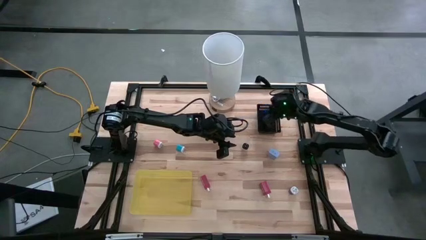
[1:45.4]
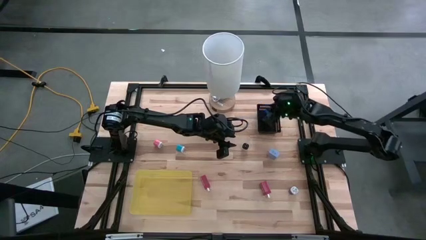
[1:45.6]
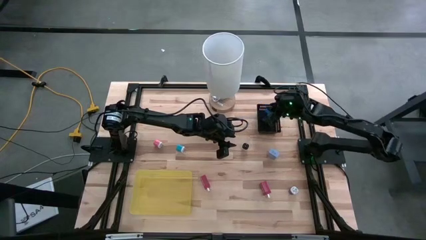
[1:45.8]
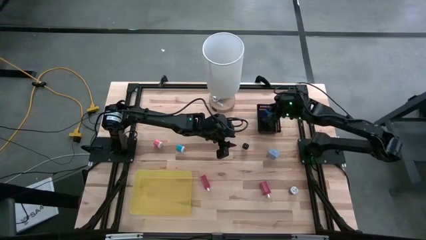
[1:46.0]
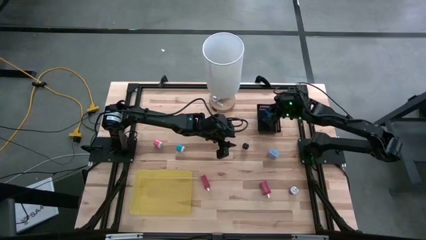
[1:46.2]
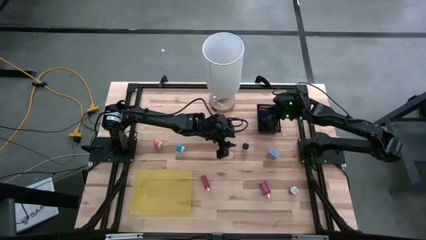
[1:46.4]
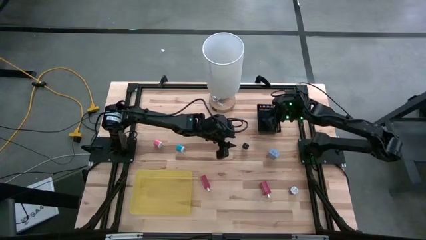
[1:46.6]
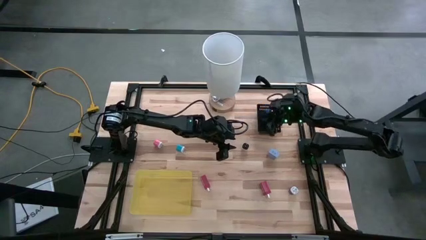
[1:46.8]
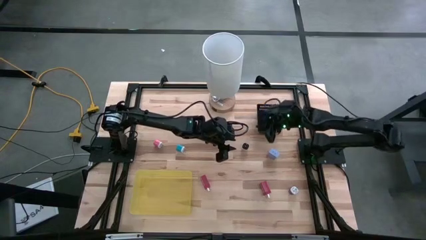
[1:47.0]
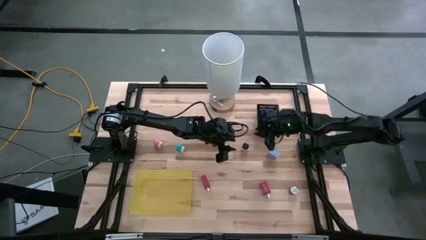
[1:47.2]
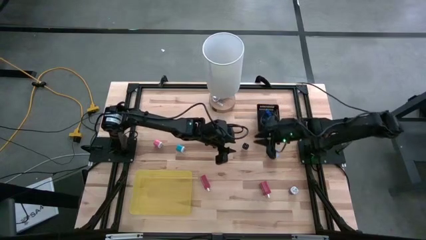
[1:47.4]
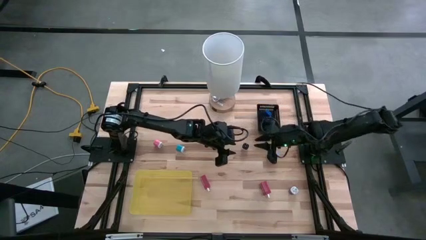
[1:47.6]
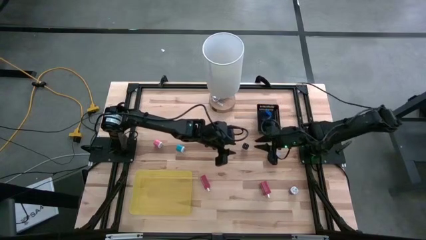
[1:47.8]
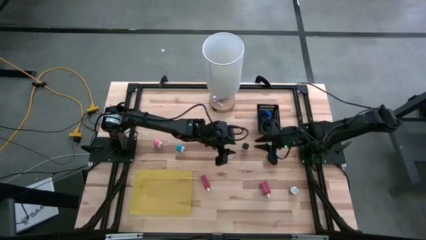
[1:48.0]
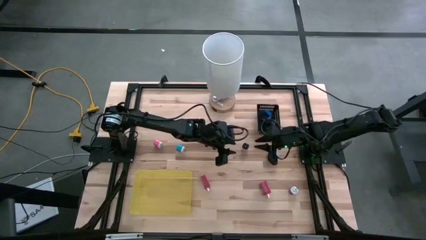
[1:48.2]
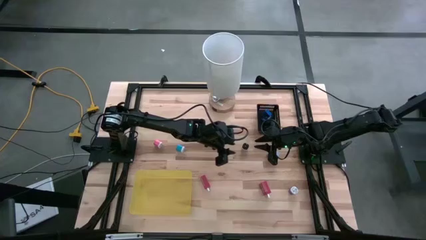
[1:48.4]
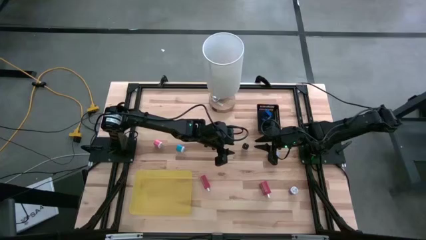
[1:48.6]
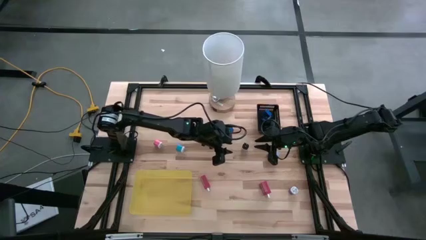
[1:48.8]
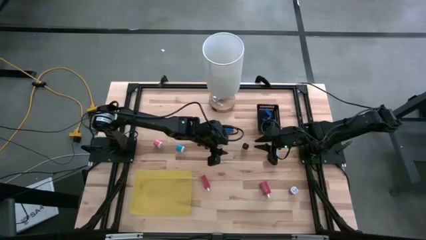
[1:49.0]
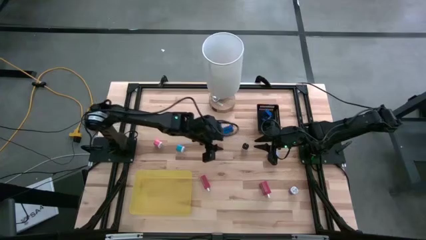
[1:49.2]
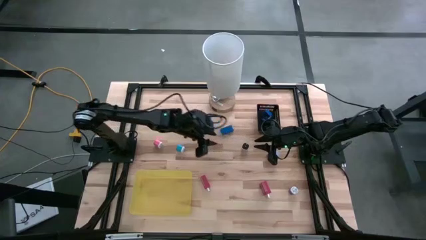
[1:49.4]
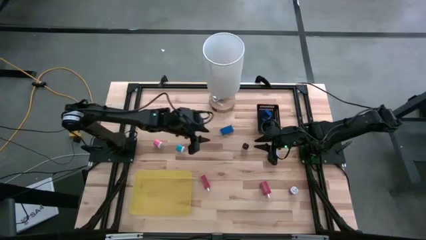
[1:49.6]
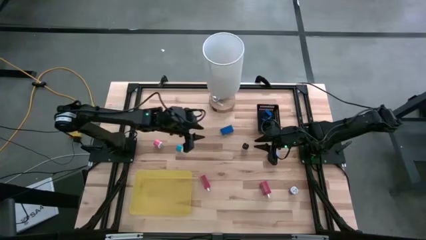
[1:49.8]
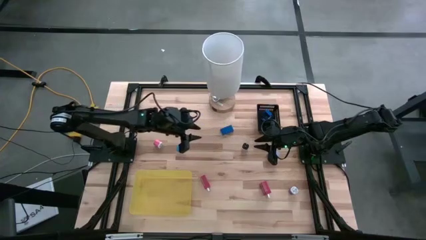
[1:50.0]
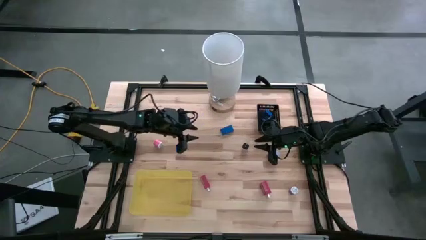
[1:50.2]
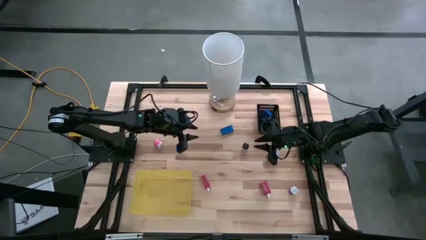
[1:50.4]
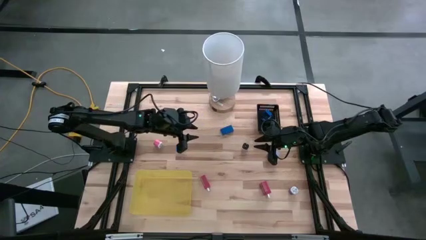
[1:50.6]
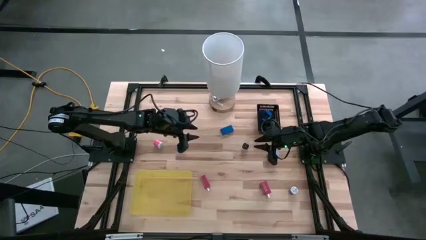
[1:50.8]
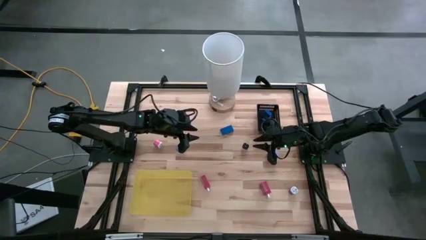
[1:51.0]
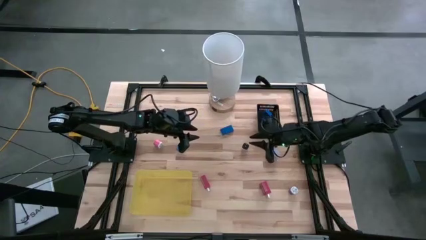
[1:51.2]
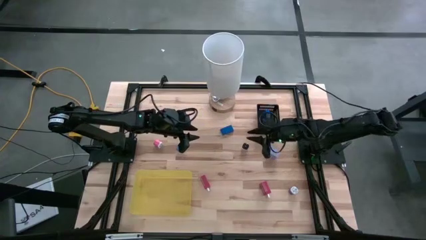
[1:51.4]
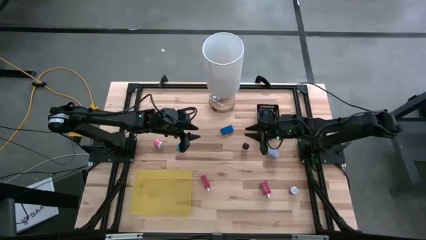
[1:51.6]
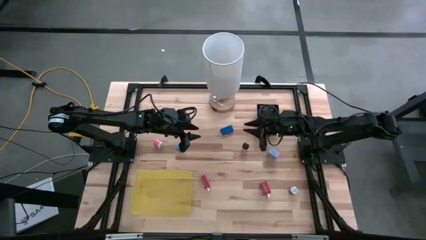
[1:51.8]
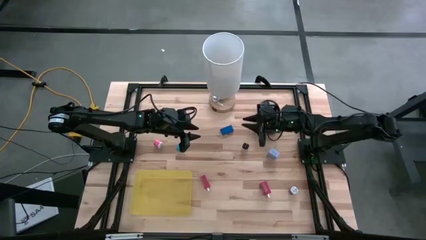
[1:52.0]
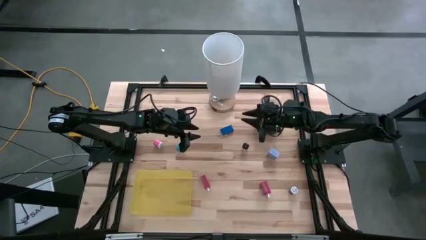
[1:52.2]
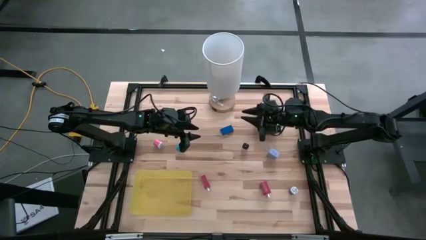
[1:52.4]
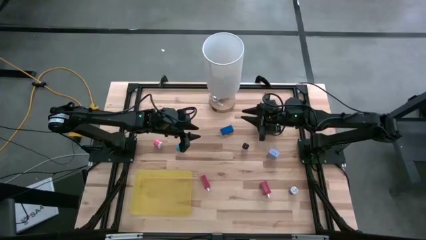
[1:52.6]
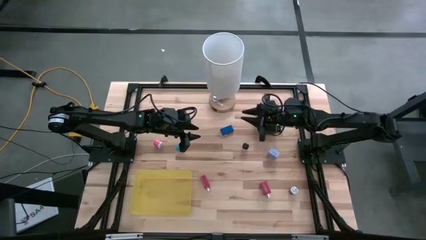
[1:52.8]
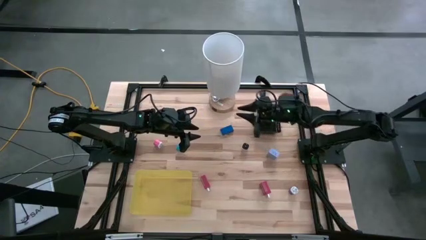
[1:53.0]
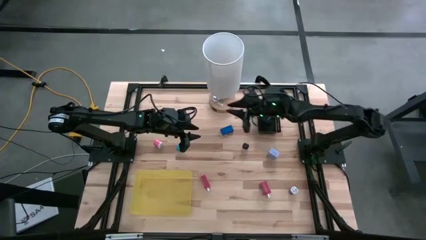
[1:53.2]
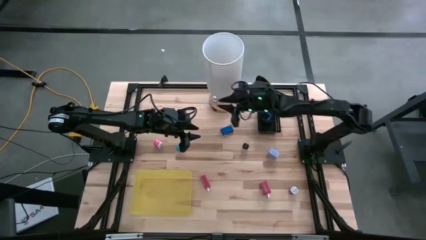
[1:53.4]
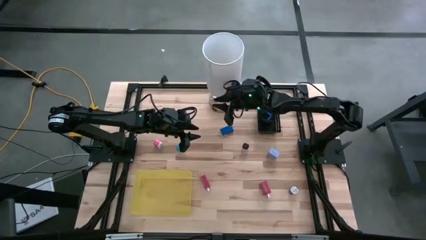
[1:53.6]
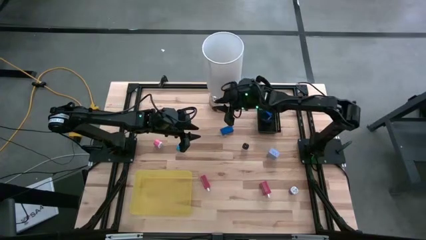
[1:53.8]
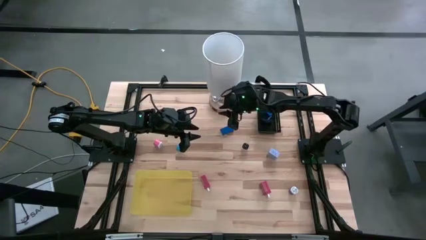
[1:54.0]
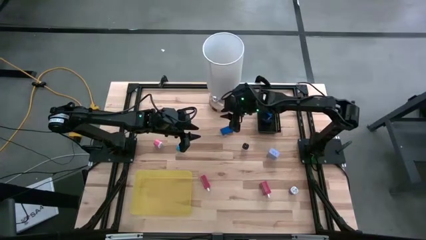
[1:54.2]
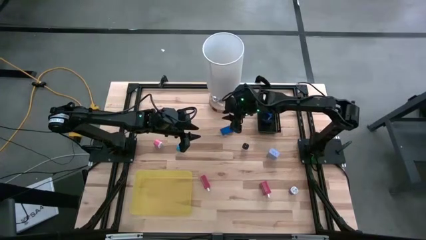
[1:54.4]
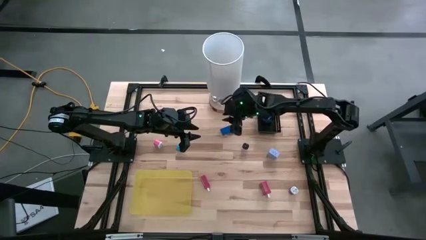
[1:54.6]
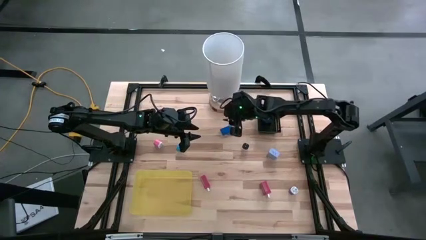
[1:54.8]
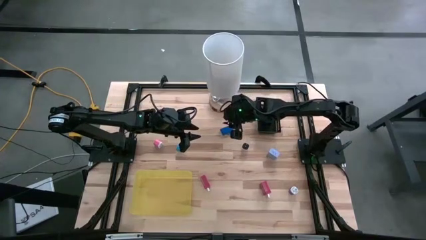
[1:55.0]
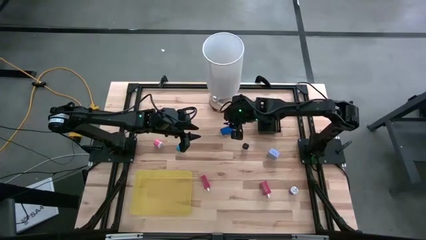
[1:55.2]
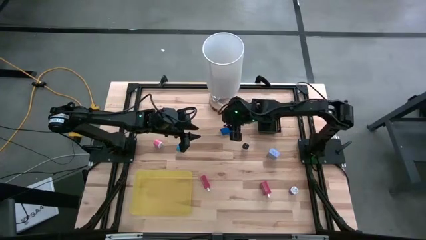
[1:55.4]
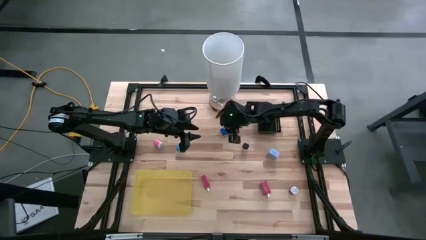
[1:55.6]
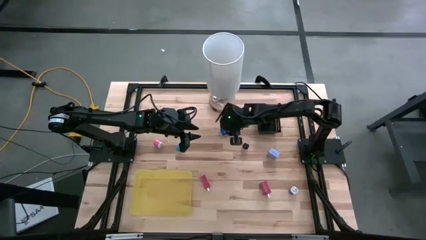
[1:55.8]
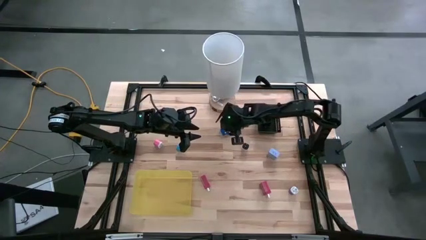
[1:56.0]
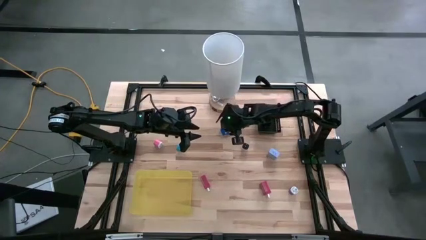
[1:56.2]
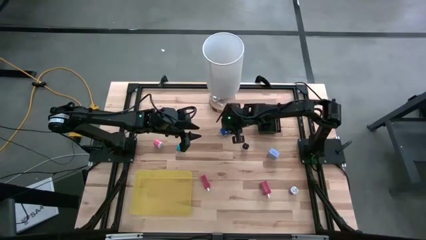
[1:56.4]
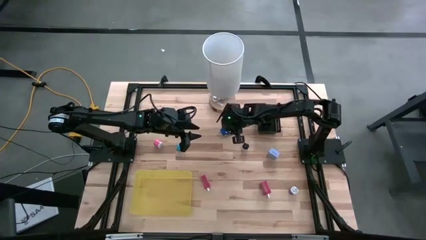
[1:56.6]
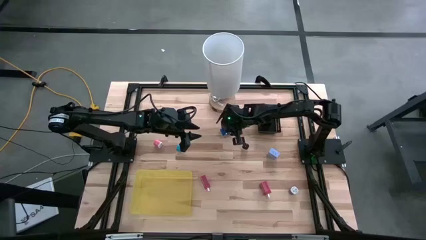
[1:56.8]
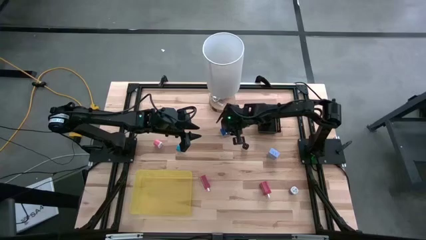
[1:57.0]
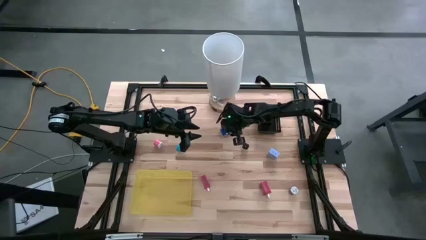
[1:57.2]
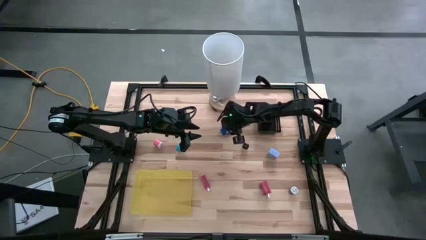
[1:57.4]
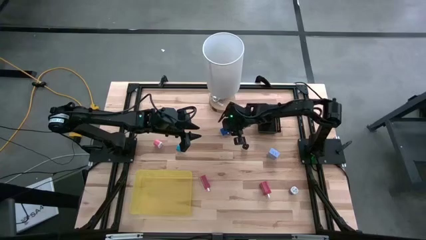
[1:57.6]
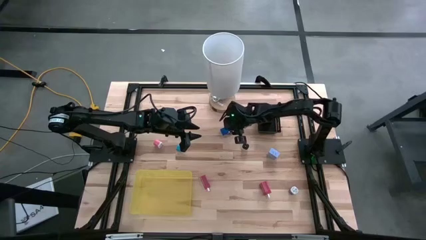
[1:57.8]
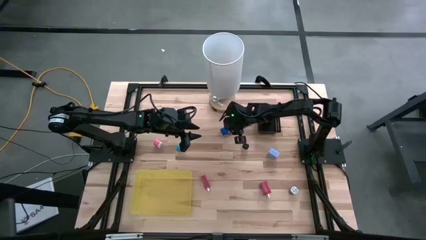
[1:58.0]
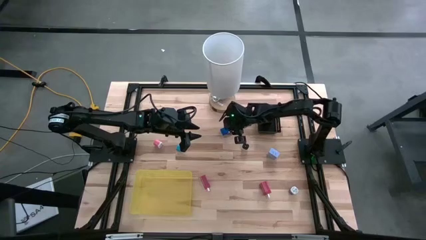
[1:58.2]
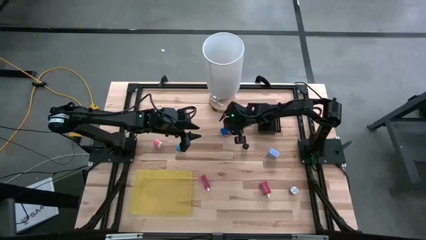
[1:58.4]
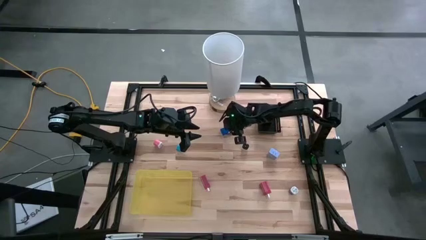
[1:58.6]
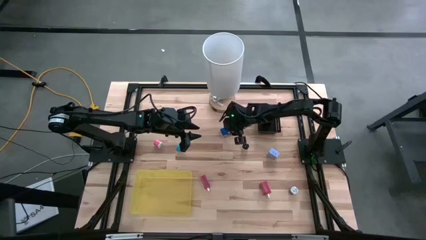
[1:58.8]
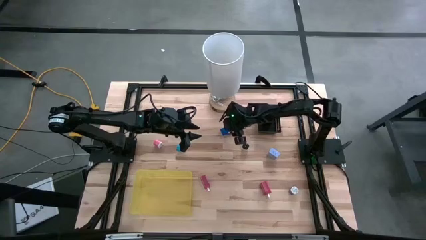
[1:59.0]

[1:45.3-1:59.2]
Task: Pick & Place Office items
Put the blue digital clock into the black bin

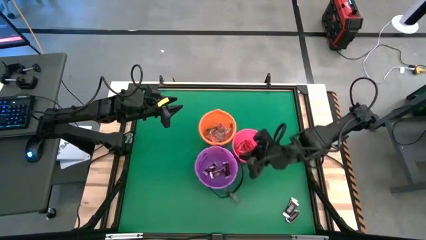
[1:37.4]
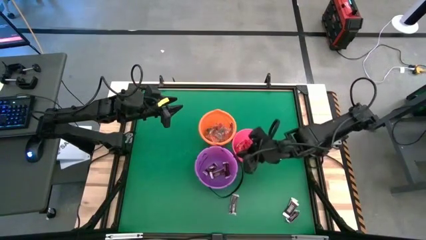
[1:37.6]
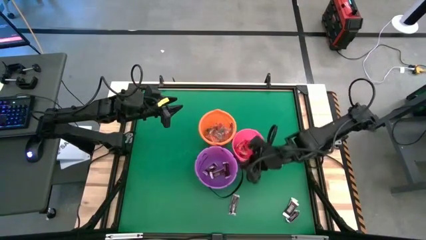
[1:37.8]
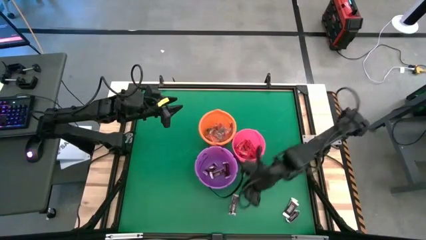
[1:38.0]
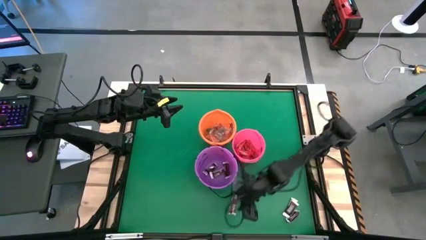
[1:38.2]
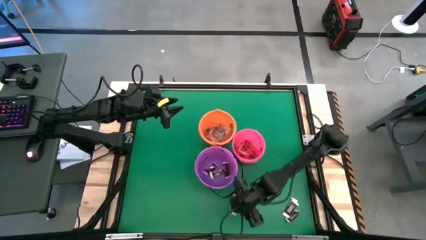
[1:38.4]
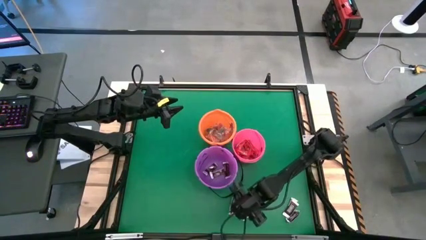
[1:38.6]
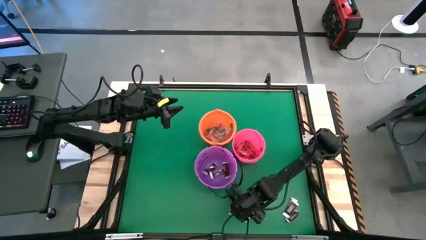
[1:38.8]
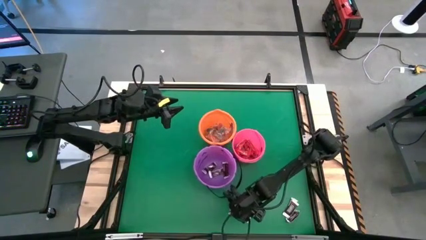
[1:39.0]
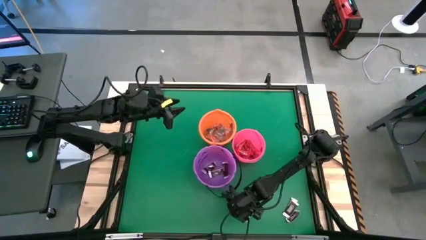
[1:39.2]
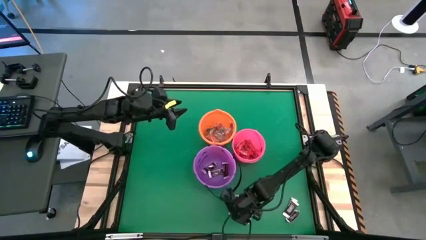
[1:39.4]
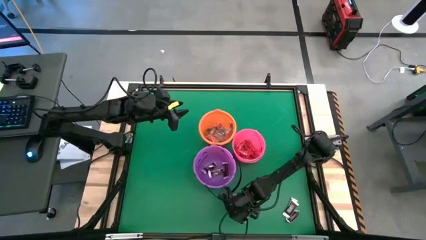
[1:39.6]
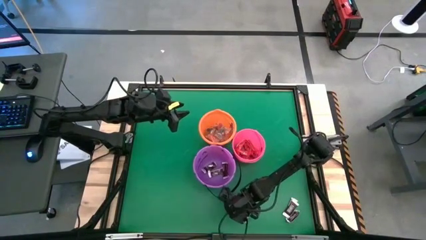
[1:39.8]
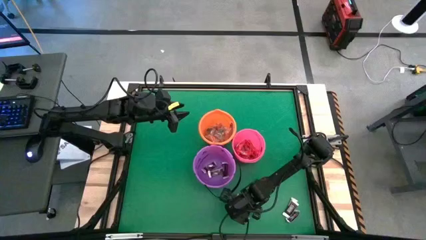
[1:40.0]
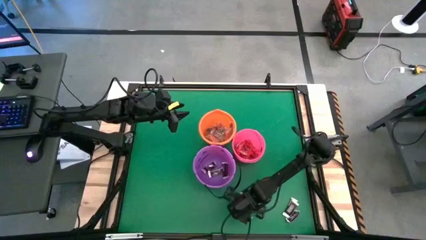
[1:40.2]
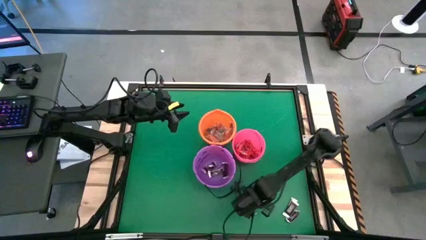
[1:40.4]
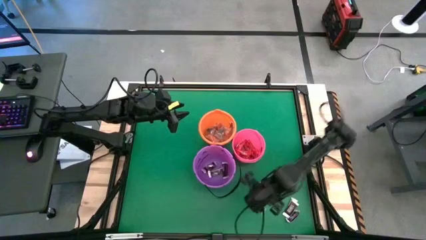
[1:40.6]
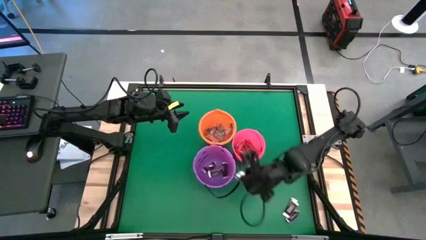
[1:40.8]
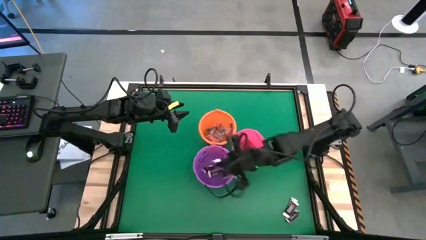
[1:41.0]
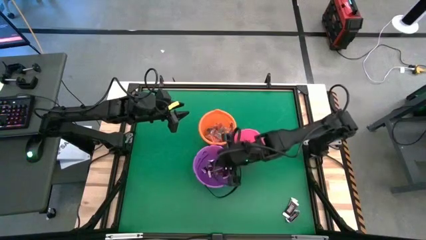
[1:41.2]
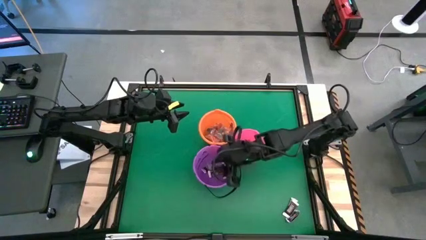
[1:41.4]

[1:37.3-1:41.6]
Task: Sort candy by brand, put in halloween buckets
Put the brown chocolate bar into the purple bucket
